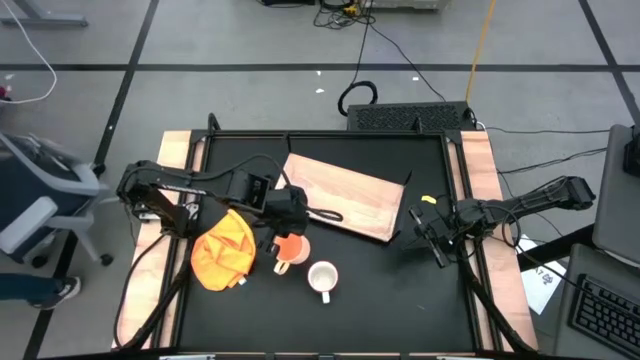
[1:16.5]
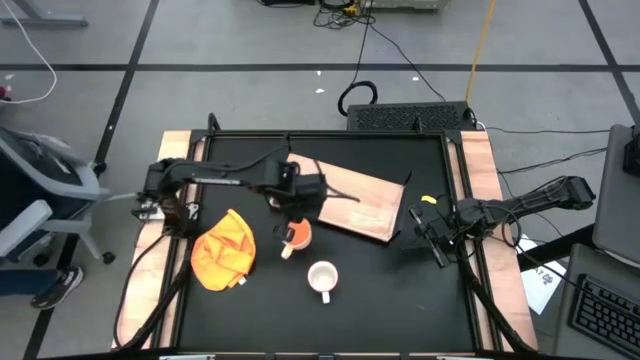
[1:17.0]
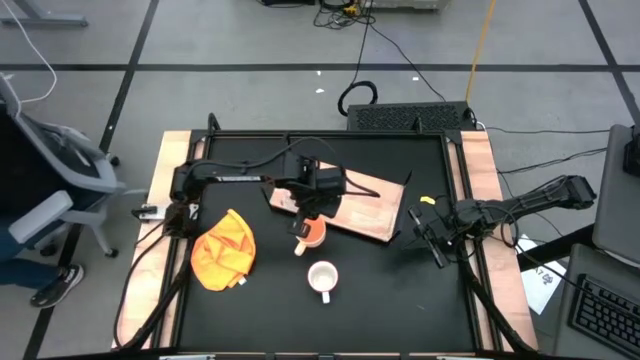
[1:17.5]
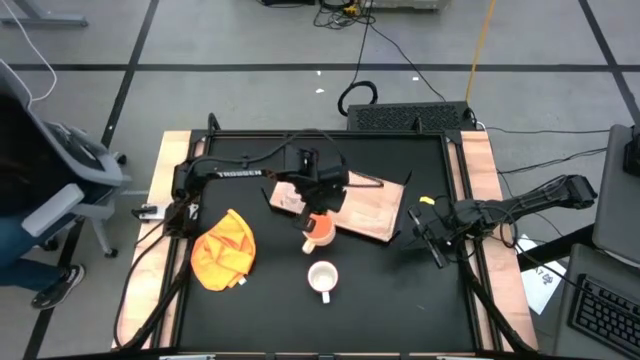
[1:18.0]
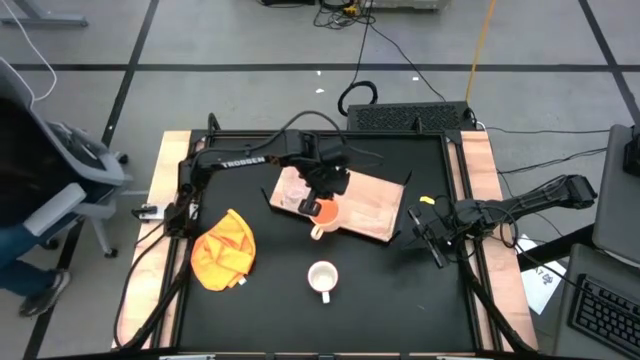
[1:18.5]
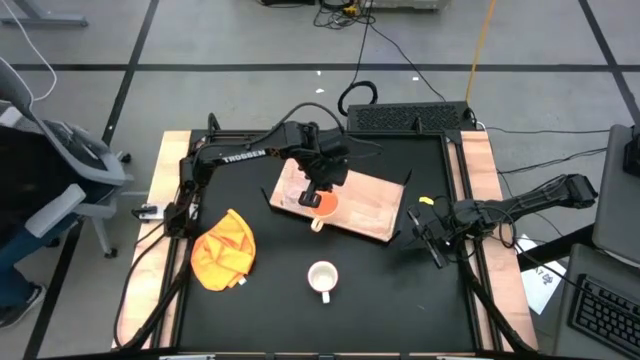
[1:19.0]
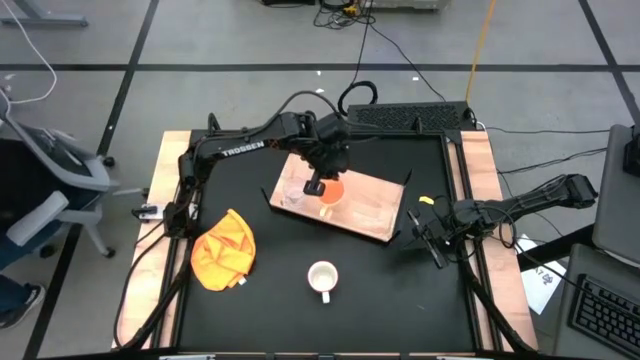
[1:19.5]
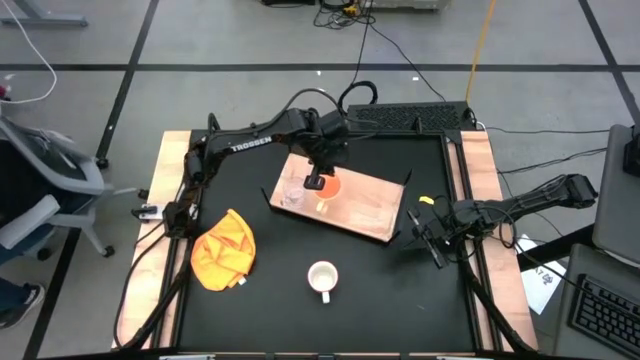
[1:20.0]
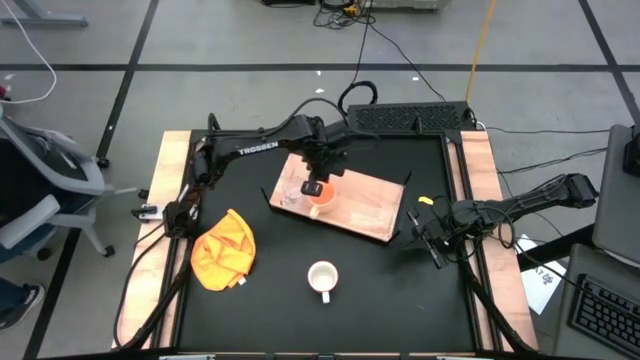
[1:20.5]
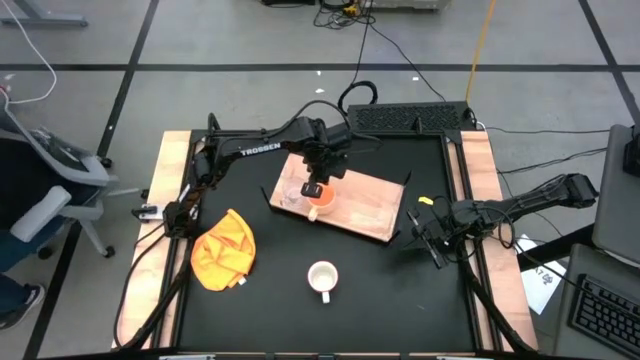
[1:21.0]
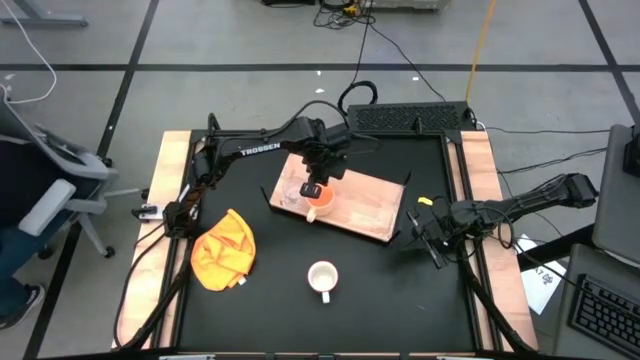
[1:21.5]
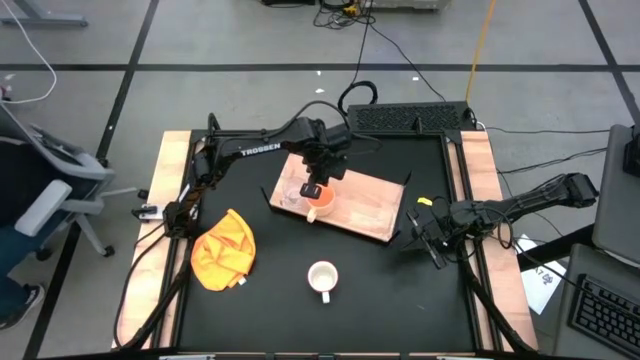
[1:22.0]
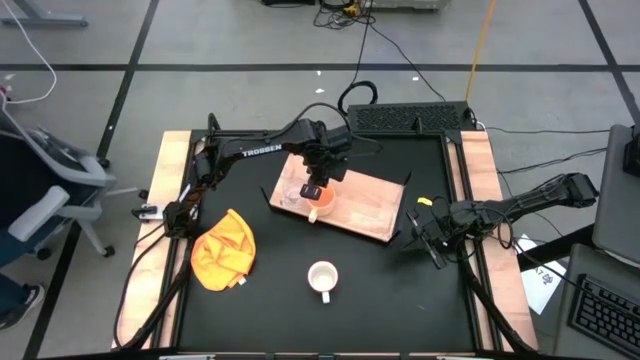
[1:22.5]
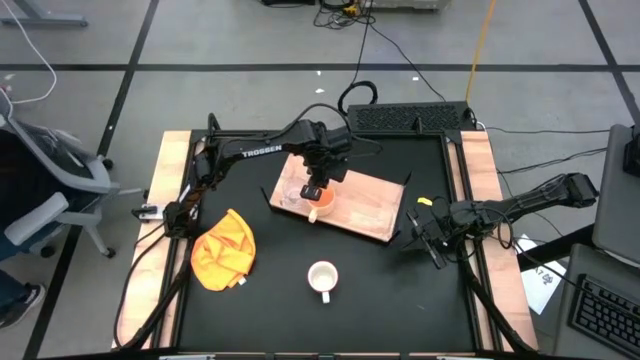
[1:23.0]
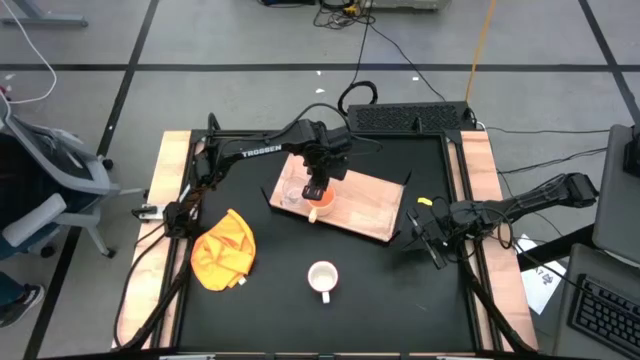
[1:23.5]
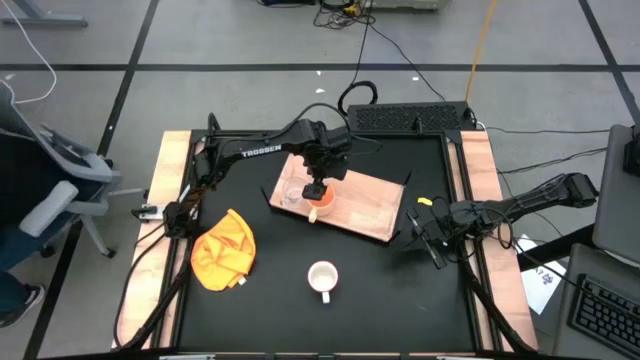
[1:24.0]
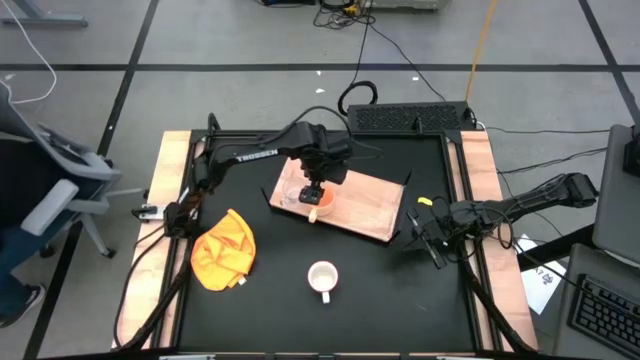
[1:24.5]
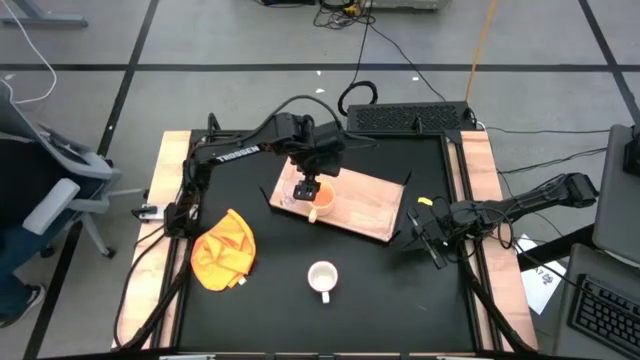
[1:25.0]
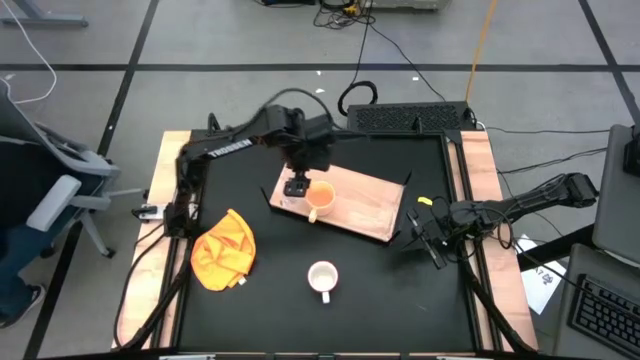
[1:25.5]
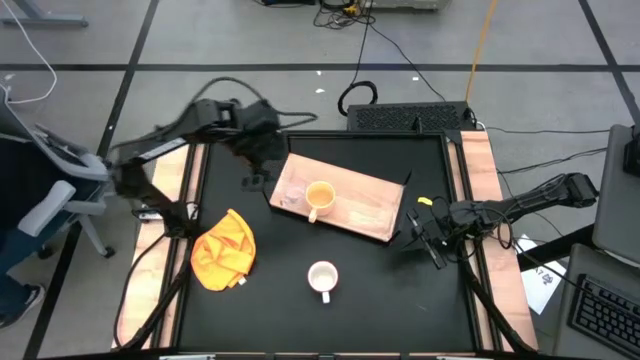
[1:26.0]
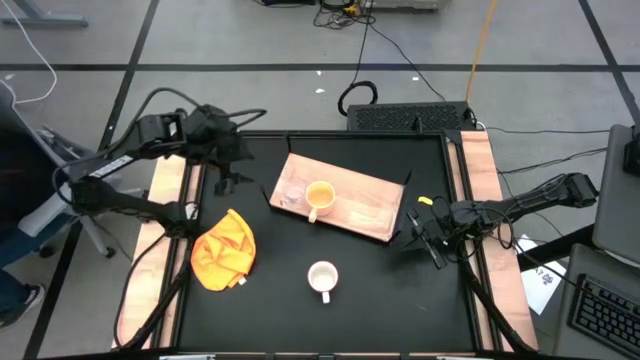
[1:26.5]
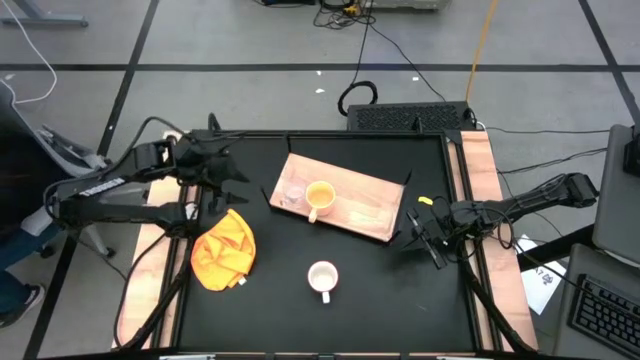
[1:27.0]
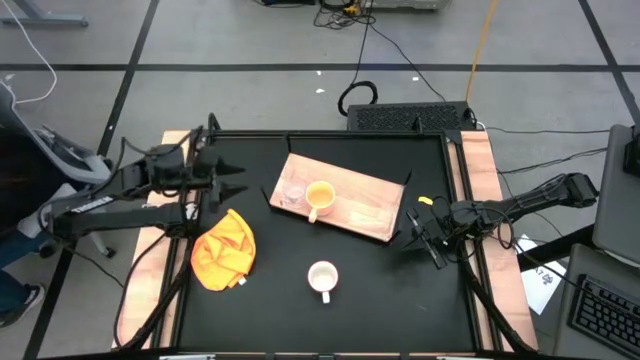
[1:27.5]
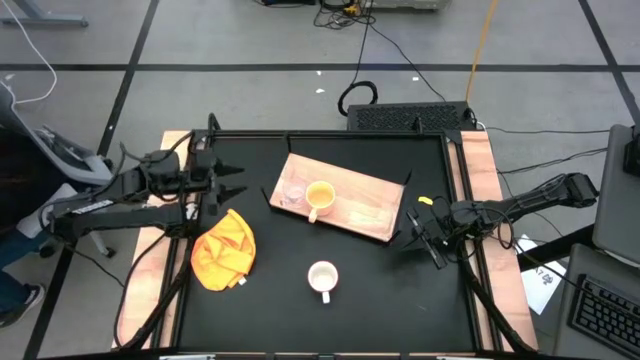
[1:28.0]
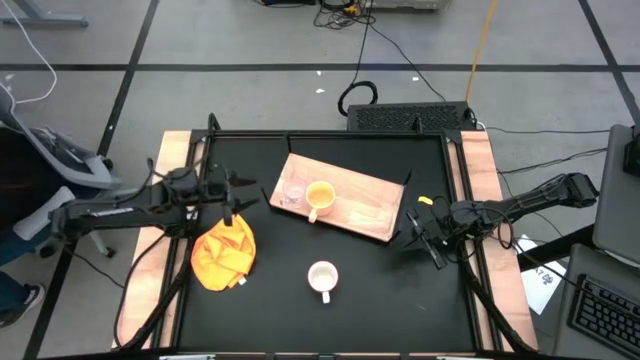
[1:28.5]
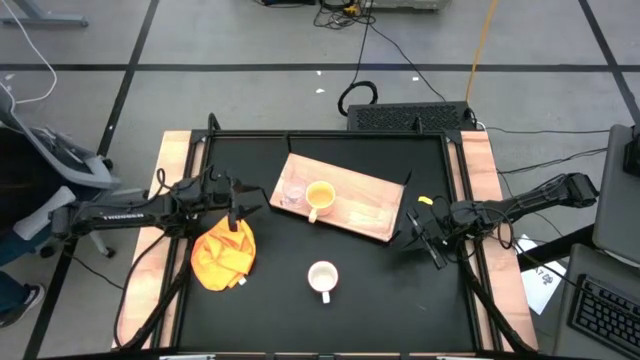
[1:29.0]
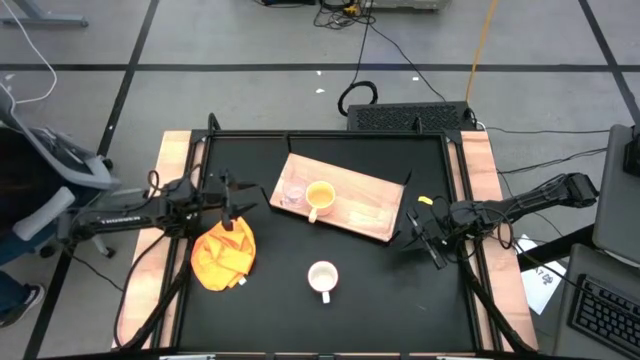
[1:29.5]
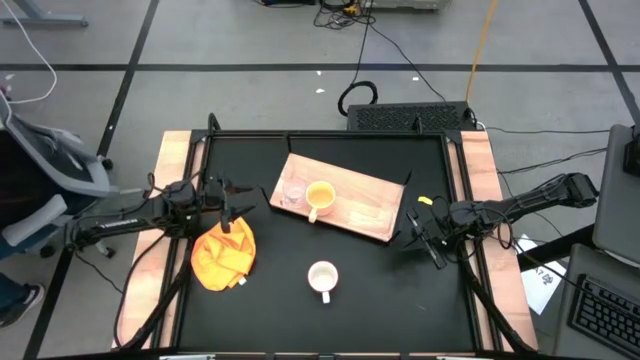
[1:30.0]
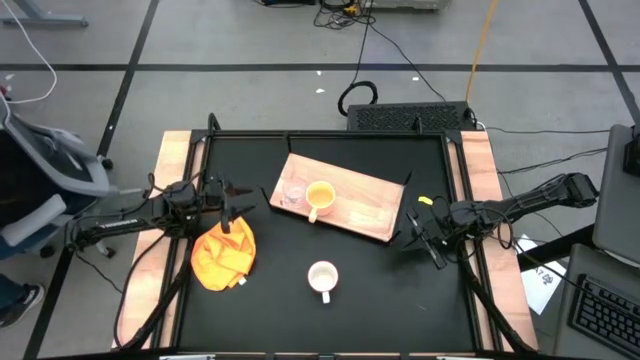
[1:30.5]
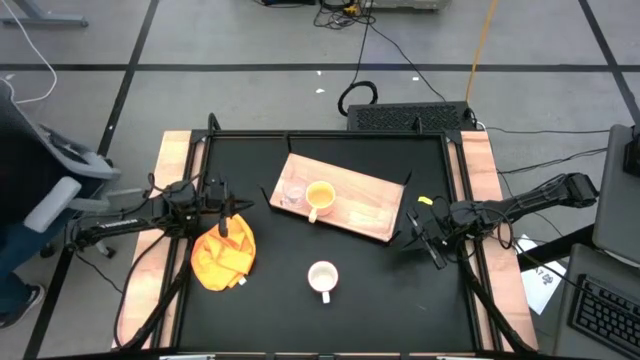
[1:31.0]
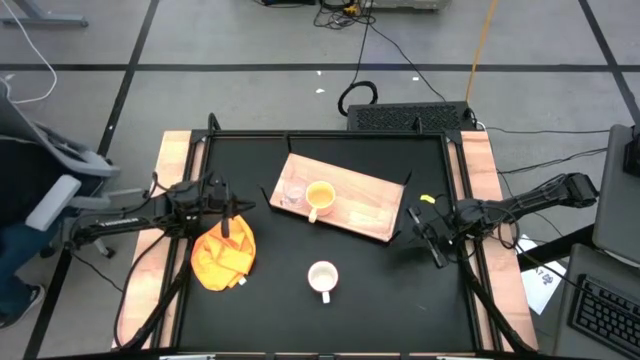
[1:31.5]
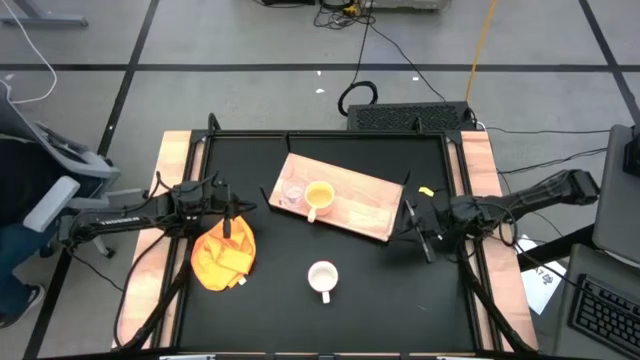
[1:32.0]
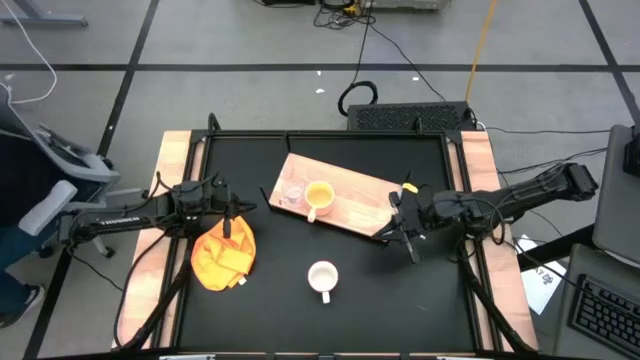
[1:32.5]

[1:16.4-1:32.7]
Task: Stack small to large cups/mugs on shelf
Put the light orange mug on the shelf
